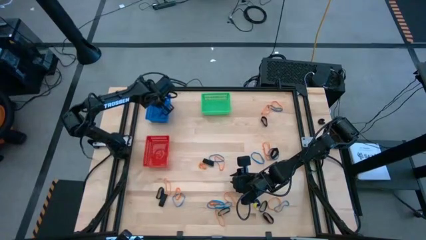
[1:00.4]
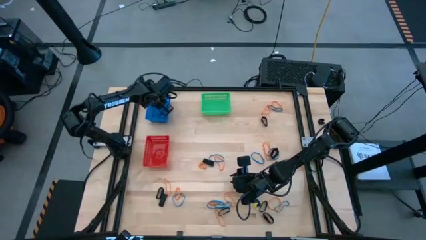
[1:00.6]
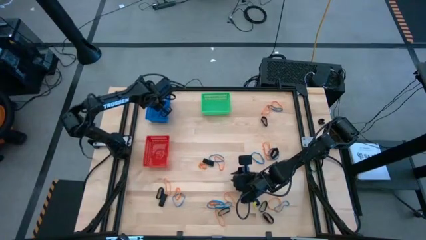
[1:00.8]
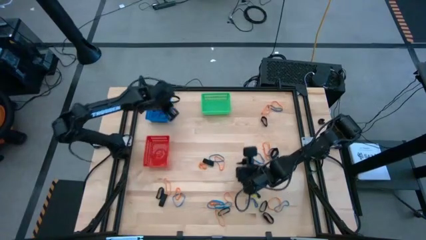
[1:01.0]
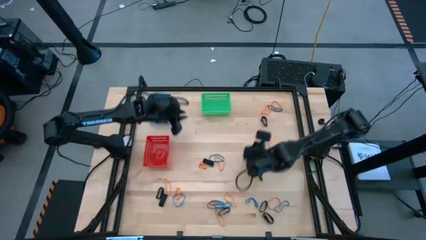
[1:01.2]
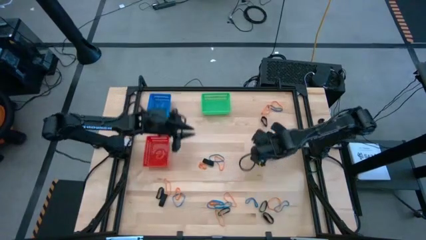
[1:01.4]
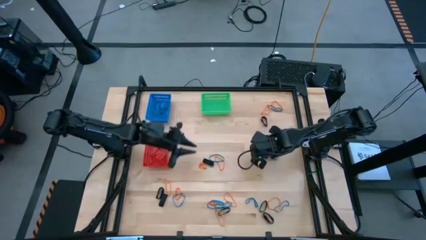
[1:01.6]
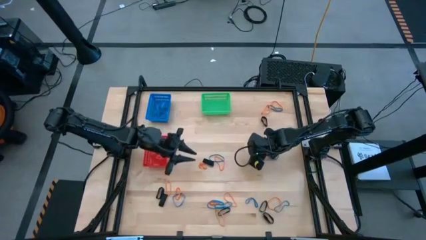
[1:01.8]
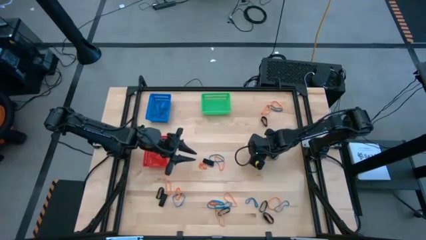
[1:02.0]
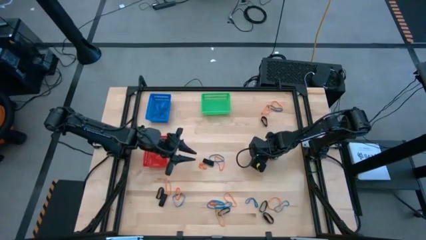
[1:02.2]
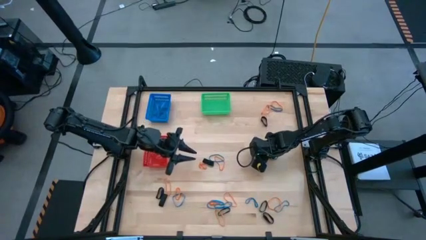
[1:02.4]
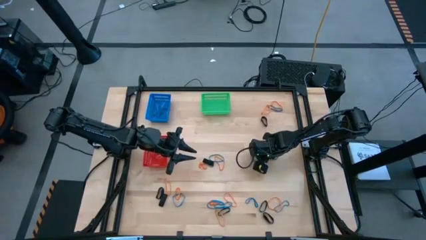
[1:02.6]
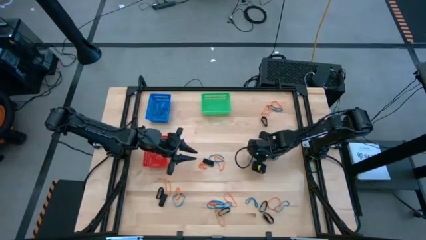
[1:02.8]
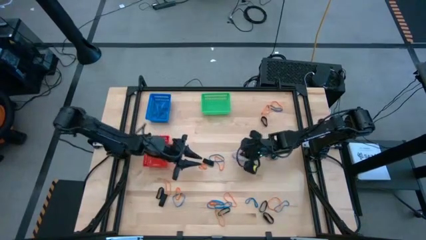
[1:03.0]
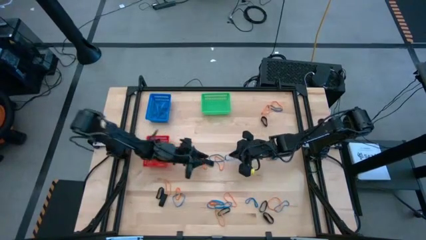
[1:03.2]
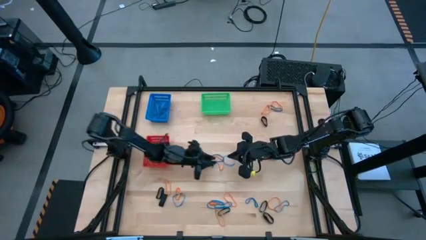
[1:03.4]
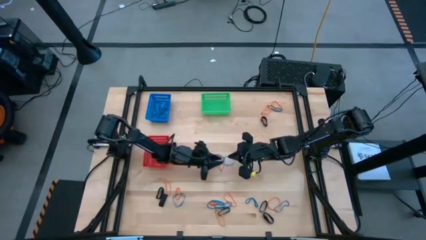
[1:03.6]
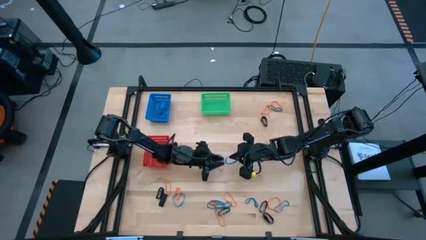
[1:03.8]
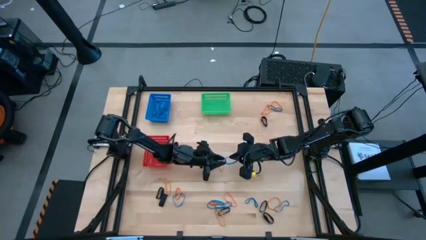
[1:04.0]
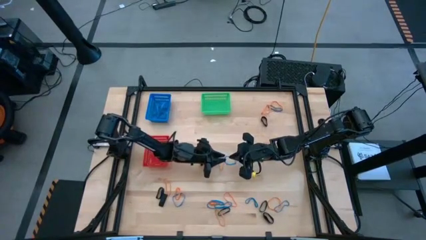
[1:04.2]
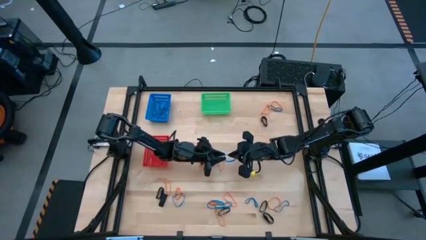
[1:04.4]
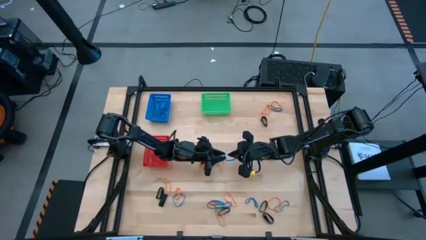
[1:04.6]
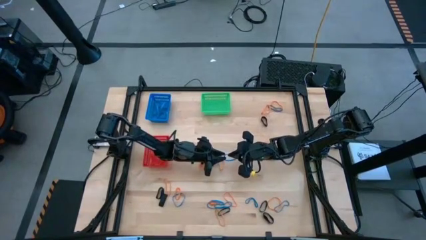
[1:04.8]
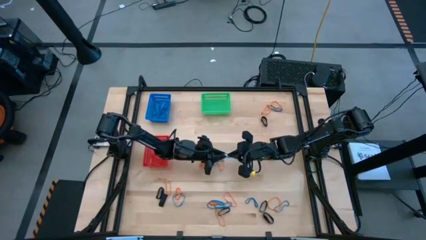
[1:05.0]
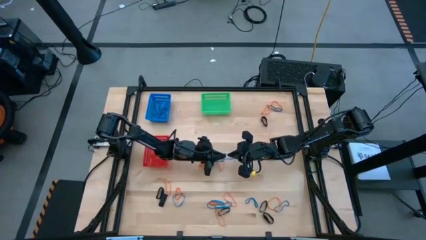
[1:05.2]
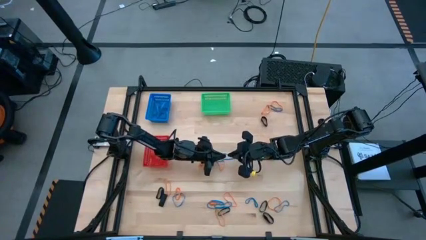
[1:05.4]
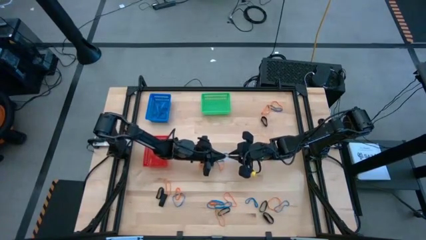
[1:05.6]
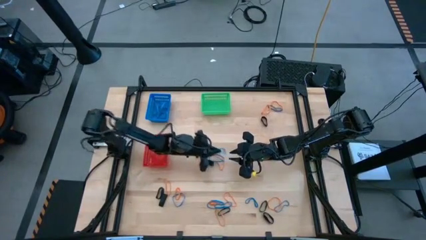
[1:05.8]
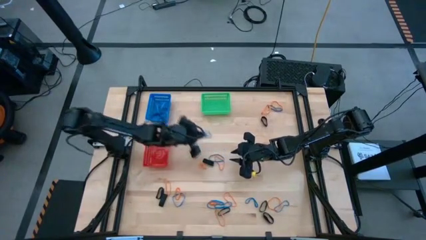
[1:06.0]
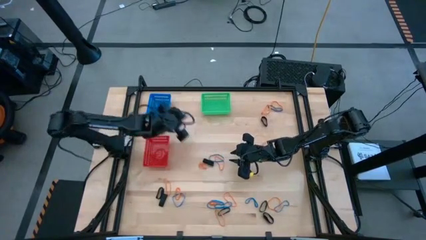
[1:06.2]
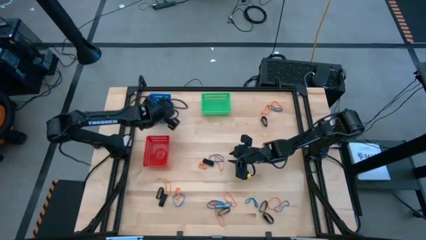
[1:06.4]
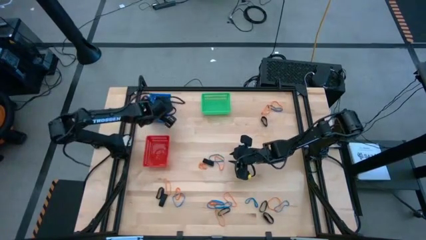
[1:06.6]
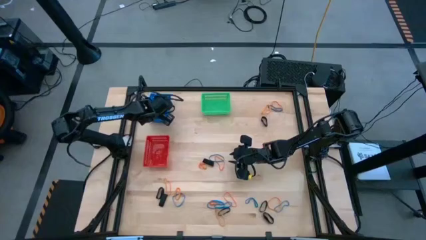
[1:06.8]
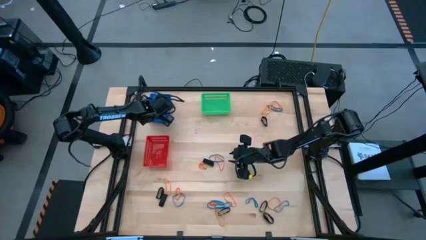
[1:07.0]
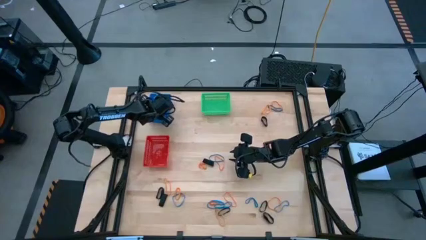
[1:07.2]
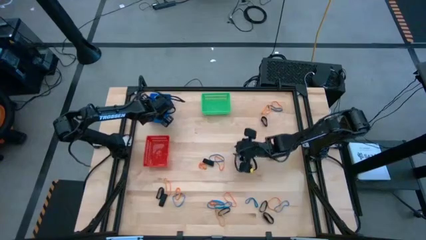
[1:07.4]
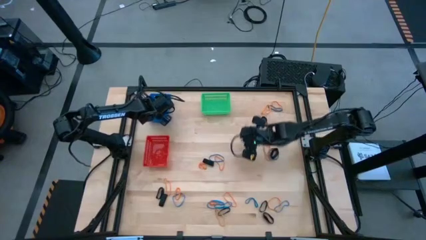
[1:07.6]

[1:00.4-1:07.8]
Task: Sort rubber bands into baskets
Put the blue rubber band into the blue bin

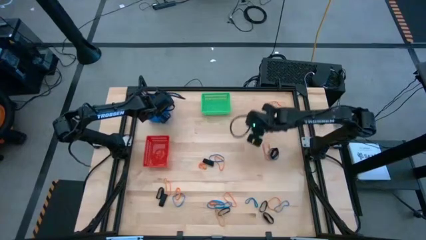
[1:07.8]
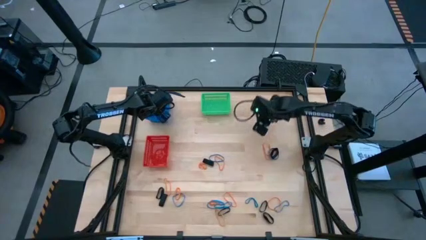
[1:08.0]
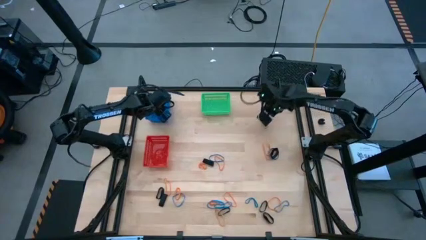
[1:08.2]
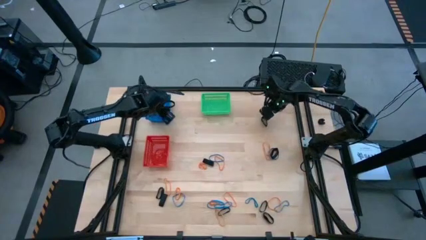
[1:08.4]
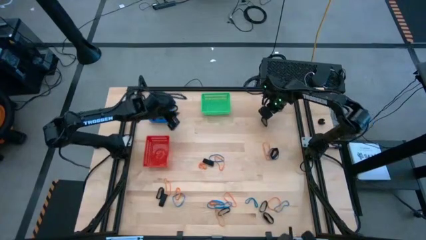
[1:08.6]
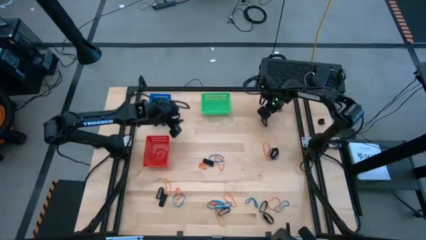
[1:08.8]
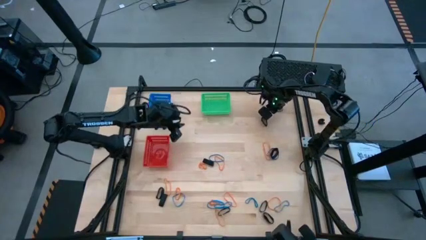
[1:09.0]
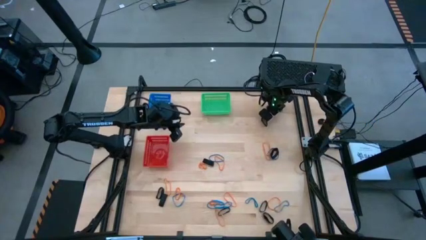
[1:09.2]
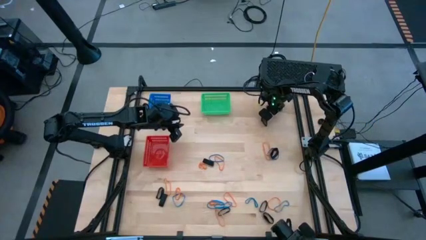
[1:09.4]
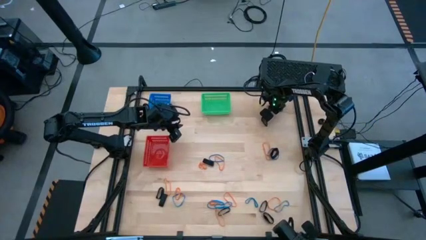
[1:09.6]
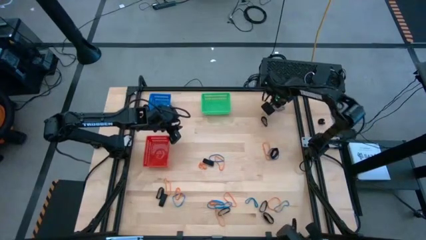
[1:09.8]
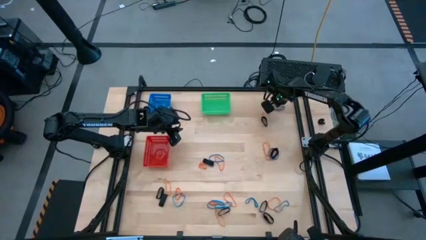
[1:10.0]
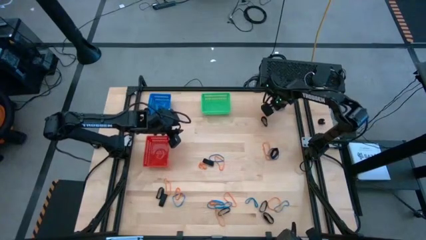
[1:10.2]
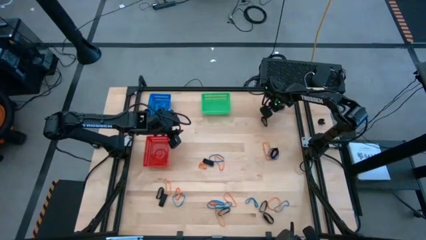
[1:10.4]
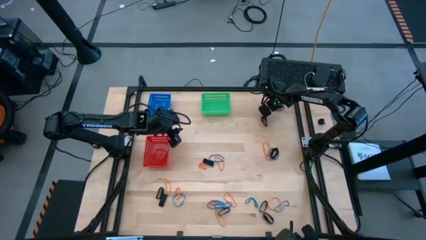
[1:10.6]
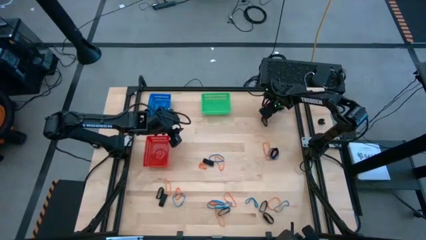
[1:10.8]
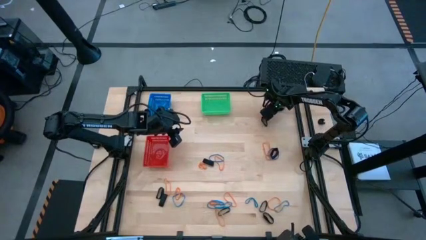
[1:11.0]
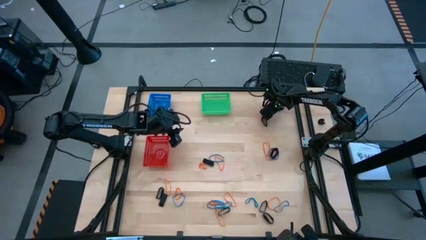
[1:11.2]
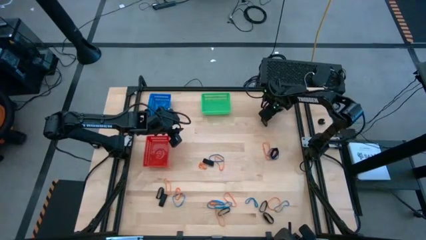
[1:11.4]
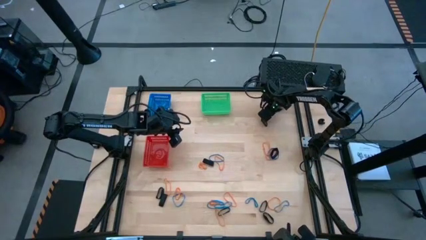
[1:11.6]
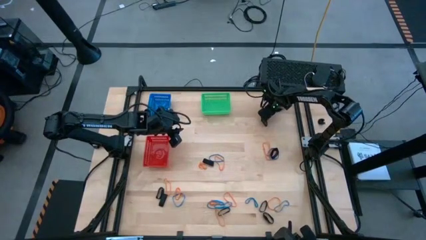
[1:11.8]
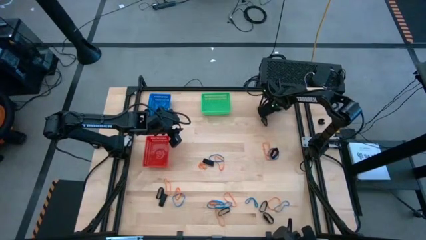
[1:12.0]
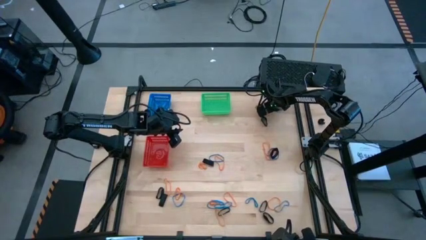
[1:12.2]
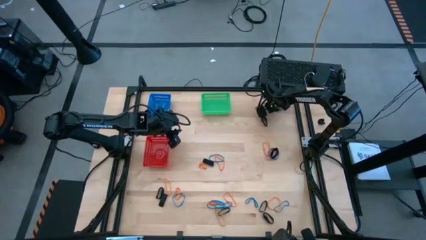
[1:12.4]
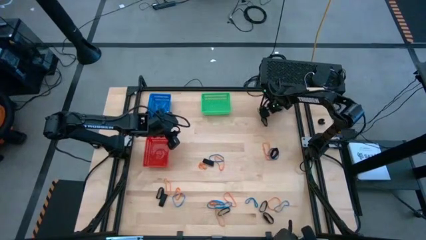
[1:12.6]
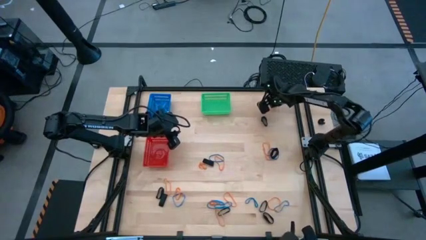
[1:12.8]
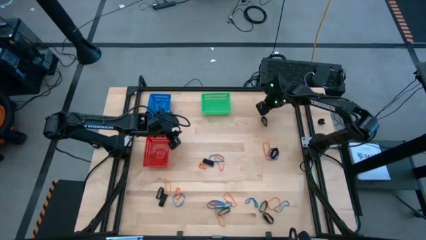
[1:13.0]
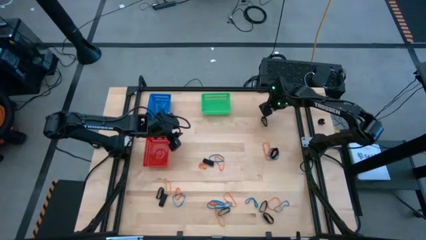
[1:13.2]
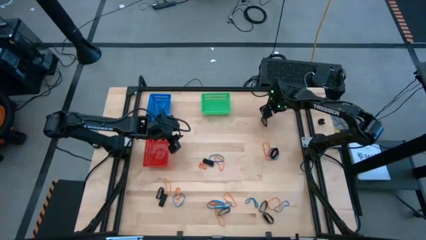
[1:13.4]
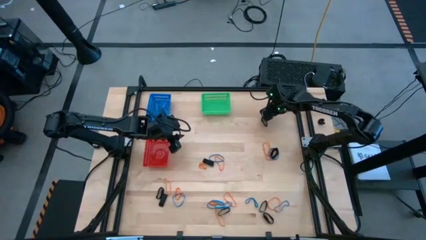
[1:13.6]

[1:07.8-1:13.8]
Put the blue rubber band into the blue bin

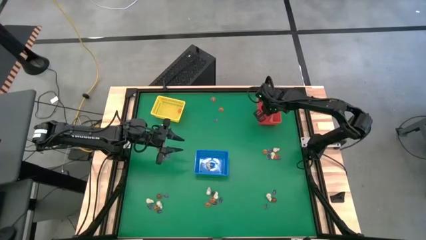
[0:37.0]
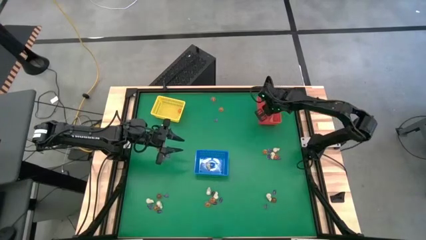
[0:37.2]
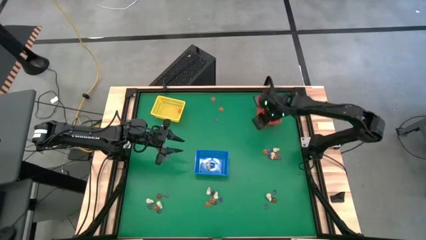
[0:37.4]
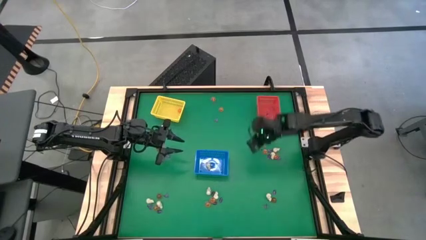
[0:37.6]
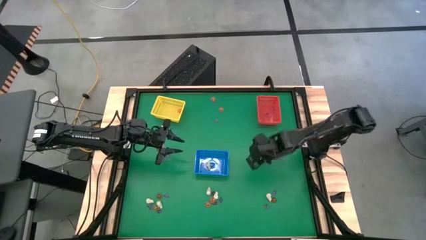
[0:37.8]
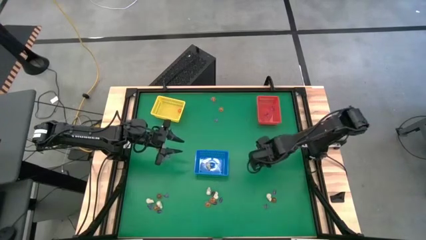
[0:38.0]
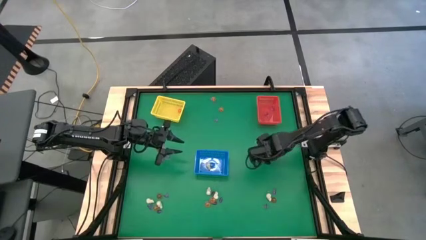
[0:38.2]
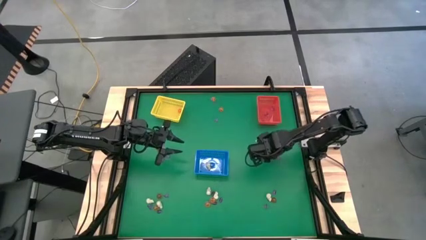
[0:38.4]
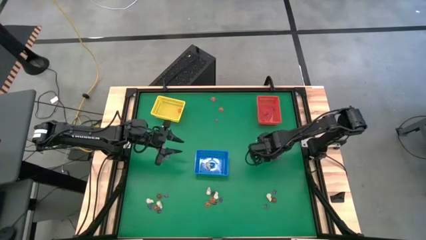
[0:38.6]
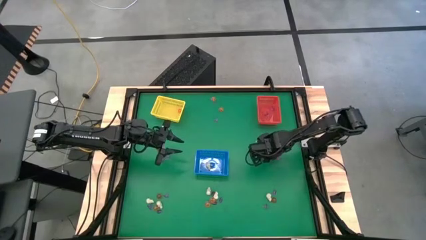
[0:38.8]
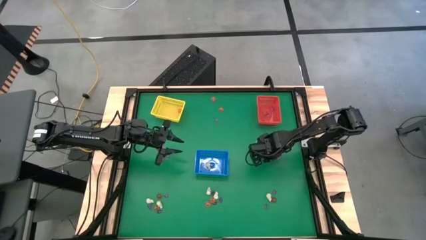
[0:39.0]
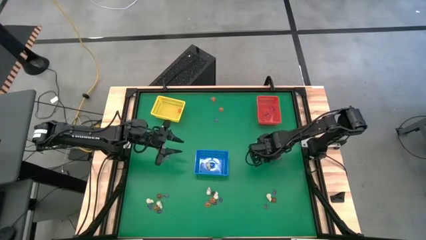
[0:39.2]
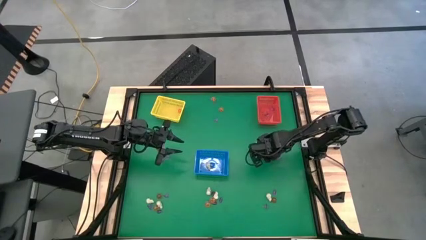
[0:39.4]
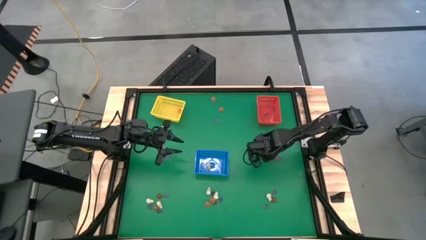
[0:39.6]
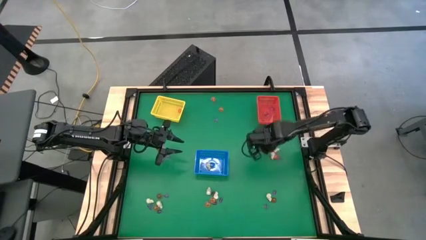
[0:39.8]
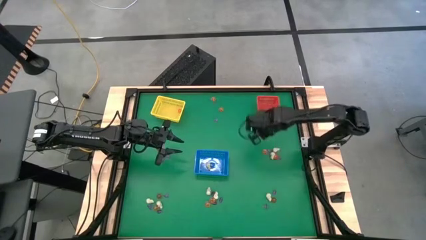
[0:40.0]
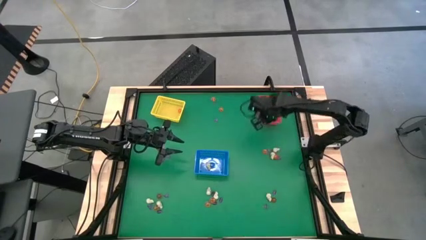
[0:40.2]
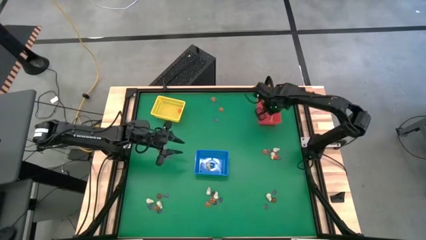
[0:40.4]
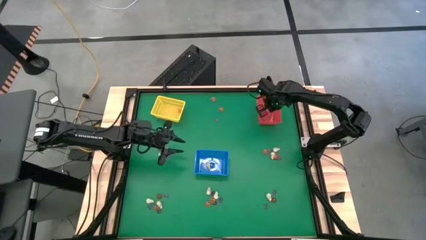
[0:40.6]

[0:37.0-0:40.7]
Task: Sort Halloween decoration
Put the purple witch hat toy into the red bin
